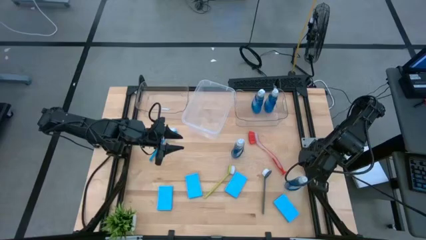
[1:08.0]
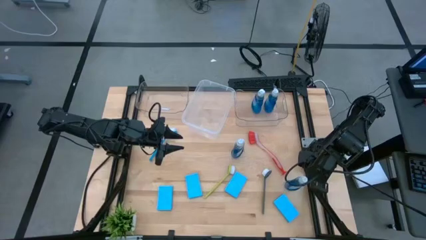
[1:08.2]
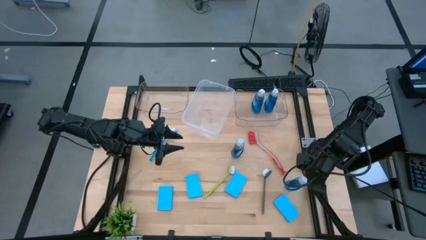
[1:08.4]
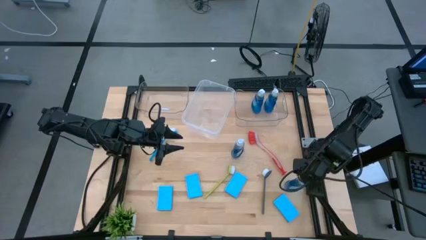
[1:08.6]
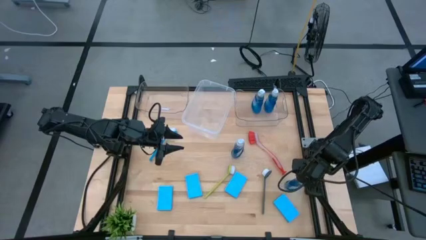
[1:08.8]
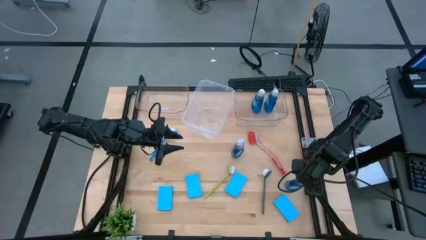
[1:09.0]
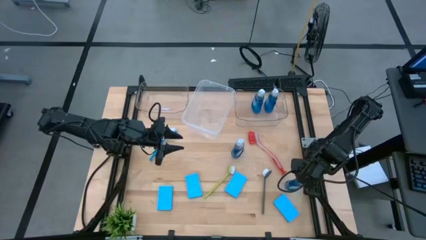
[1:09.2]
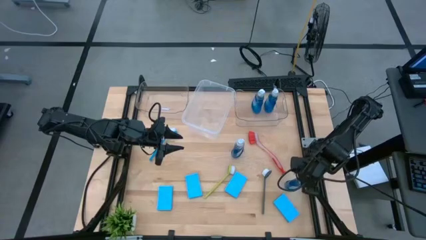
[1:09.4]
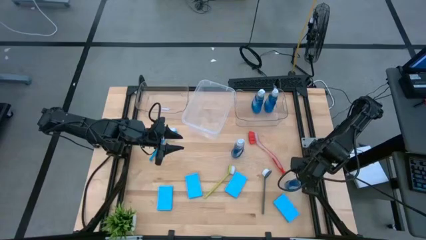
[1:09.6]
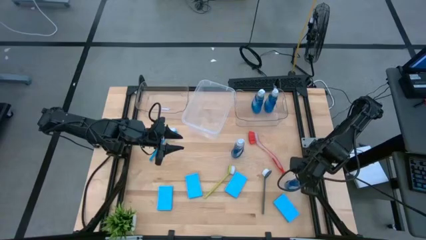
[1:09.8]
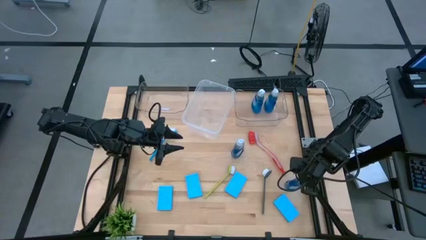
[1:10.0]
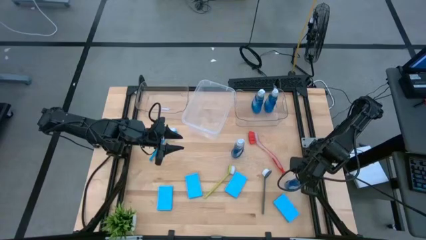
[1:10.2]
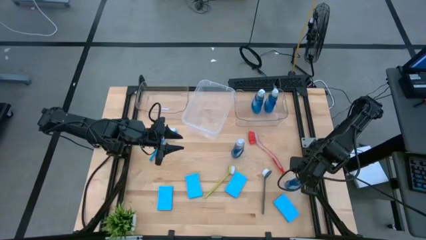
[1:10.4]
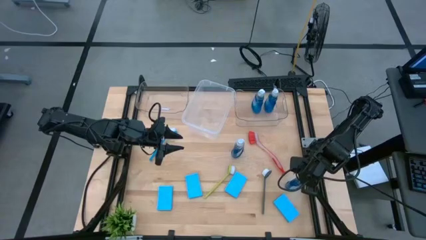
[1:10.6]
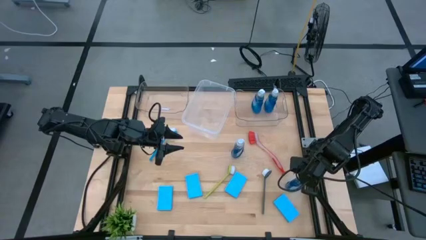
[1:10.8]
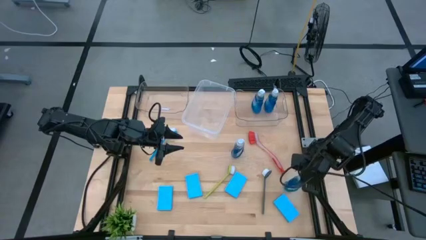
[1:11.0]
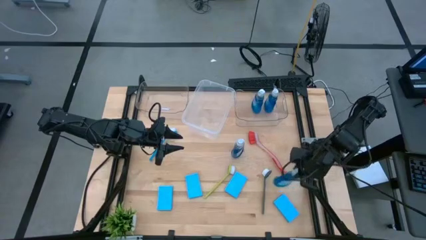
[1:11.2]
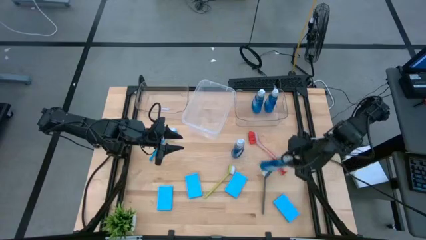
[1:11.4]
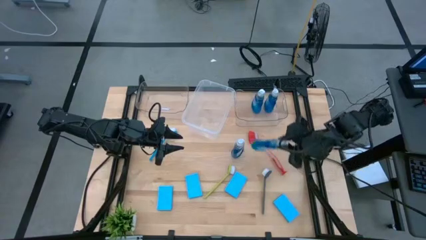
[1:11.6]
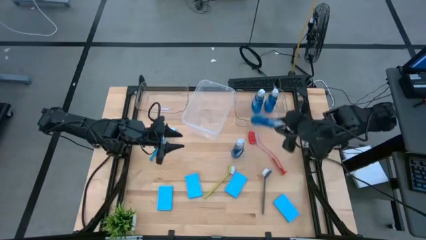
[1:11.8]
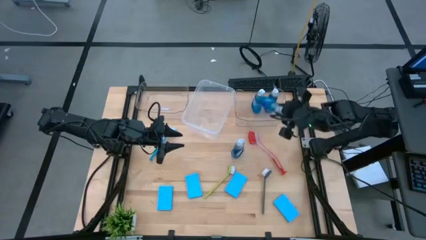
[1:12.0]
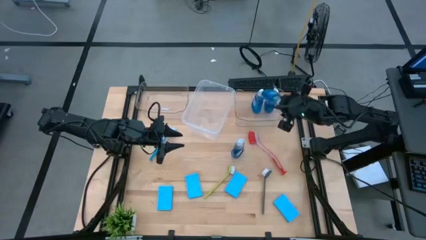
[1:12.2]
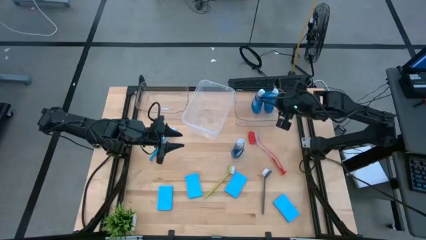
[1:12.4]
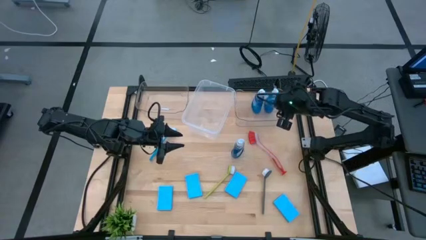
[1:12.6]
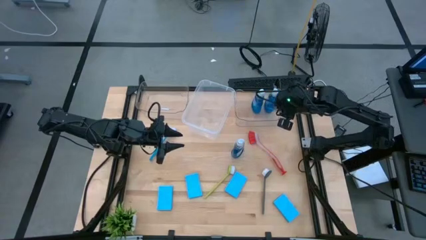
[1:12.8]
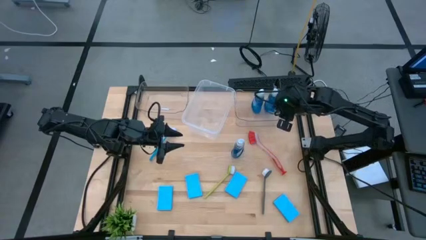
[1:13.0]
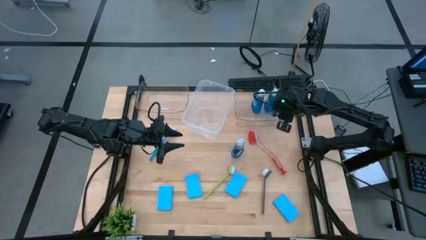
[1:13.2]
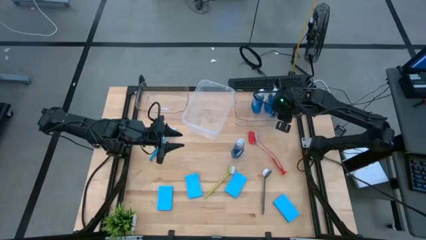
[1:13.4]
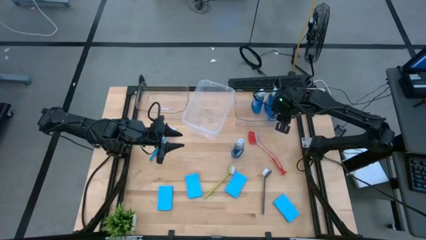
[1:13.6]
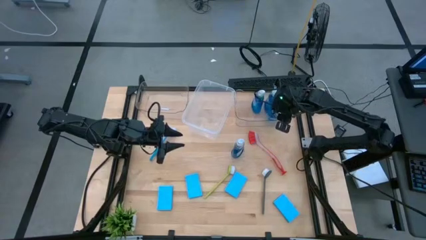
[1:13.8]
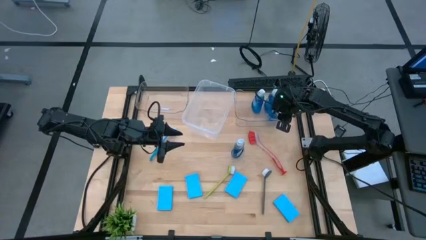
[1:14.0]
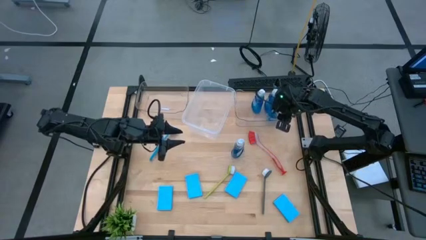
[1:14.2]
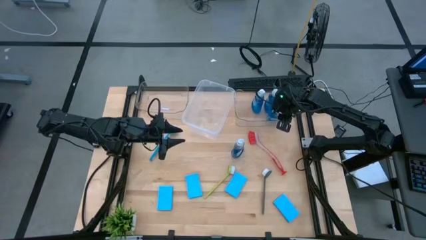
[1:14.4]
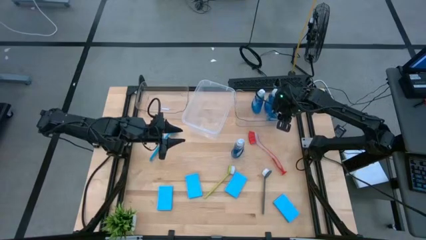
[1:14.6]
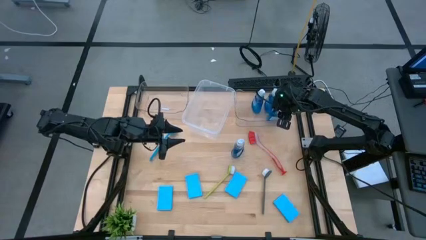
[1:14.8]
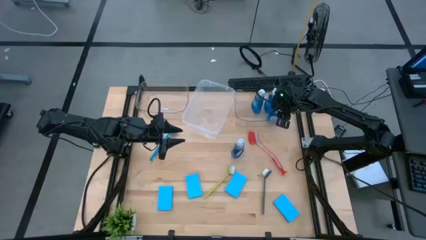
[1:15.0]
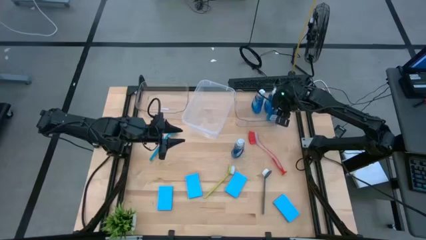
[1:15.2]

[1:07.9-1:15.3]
Task: Pick & Place Kitchen Sink Supplies
Put the blue soap dispenser into the right transparent bin

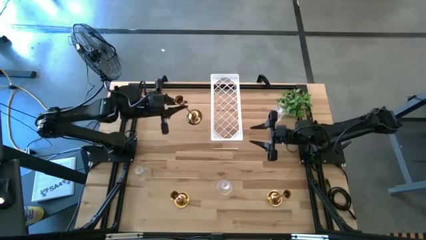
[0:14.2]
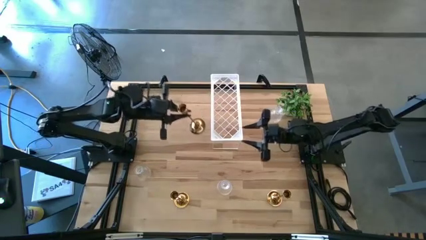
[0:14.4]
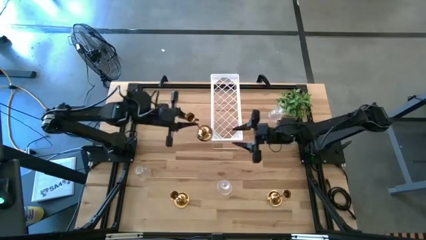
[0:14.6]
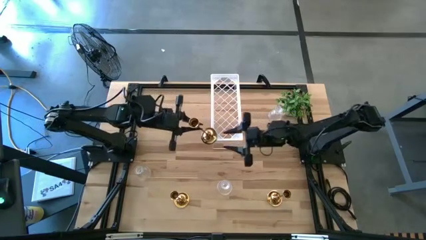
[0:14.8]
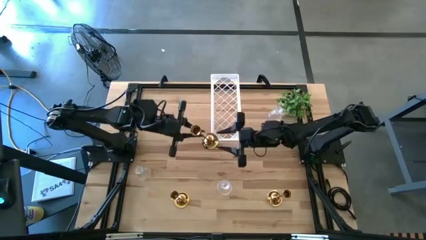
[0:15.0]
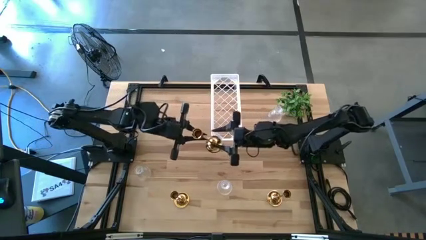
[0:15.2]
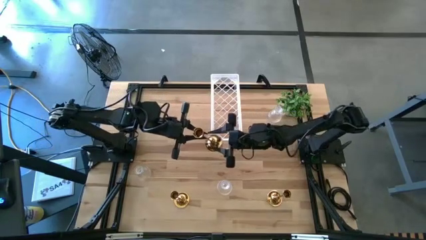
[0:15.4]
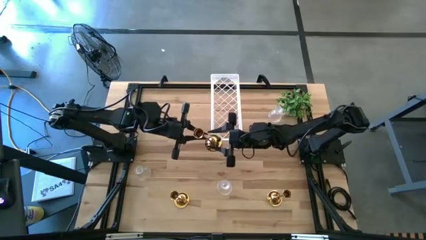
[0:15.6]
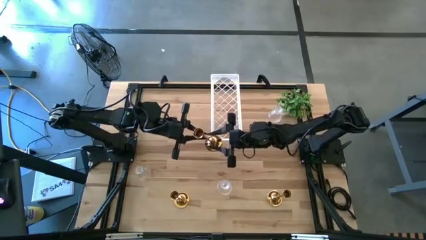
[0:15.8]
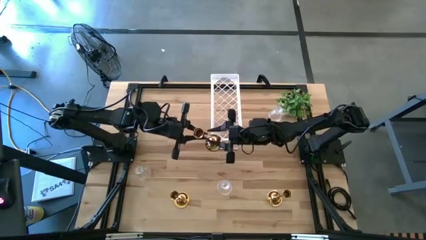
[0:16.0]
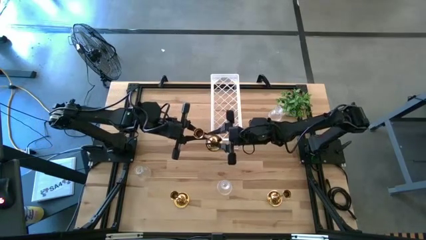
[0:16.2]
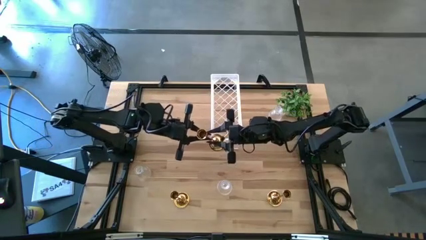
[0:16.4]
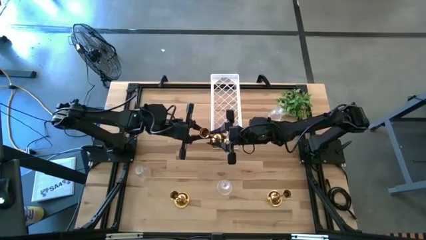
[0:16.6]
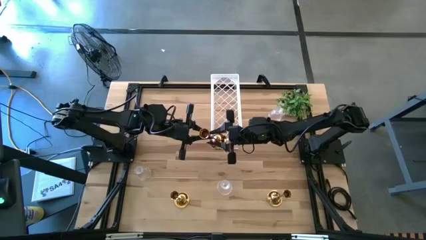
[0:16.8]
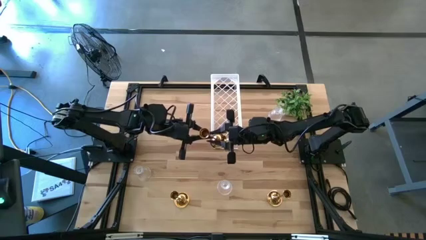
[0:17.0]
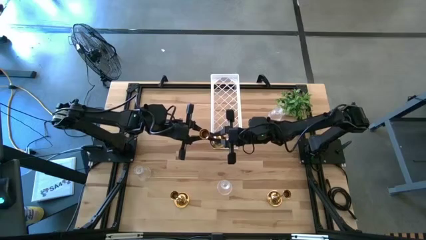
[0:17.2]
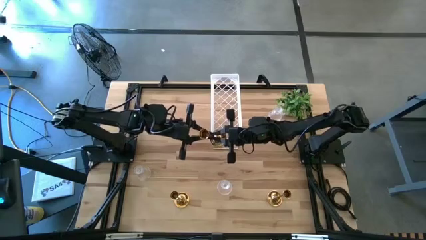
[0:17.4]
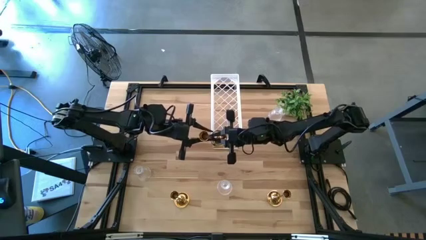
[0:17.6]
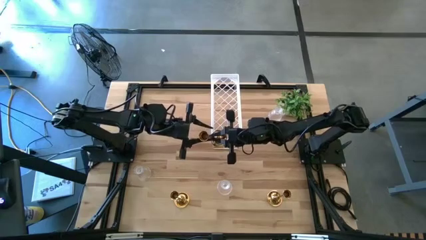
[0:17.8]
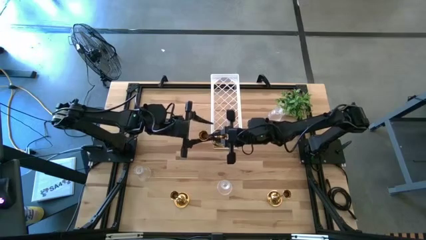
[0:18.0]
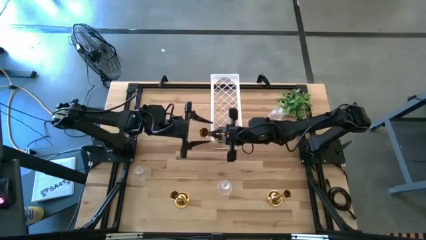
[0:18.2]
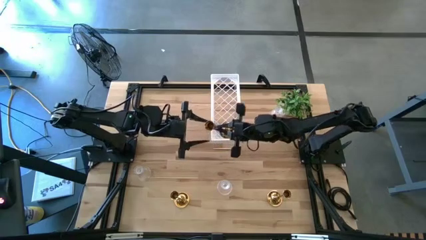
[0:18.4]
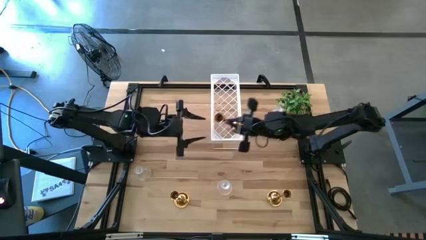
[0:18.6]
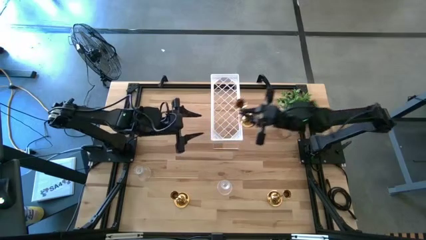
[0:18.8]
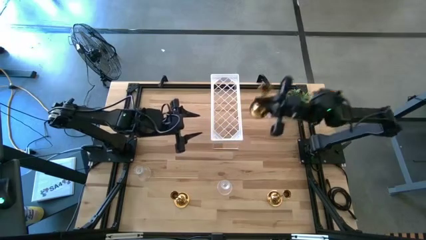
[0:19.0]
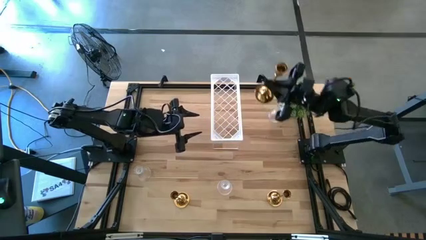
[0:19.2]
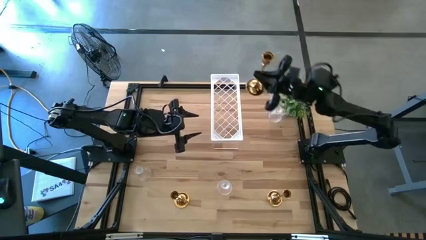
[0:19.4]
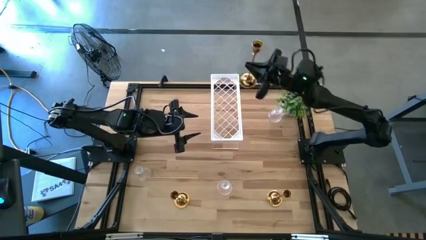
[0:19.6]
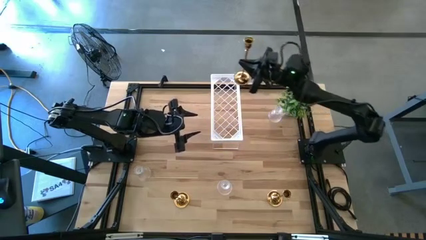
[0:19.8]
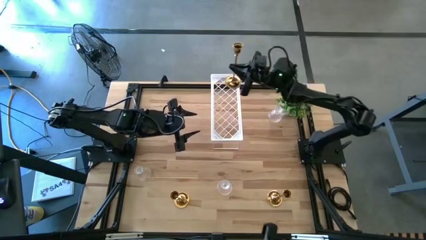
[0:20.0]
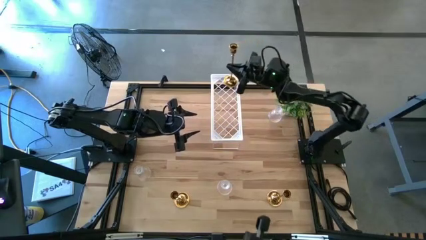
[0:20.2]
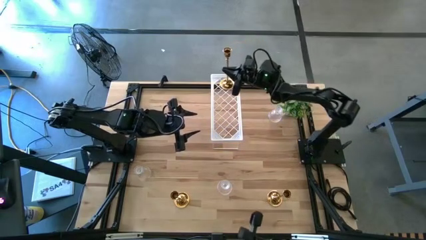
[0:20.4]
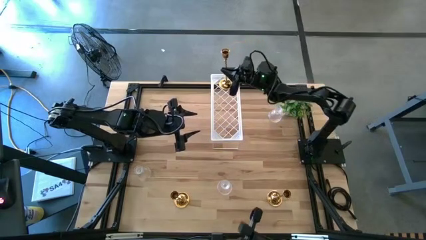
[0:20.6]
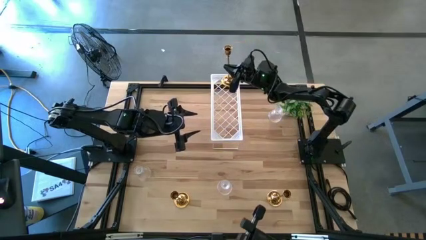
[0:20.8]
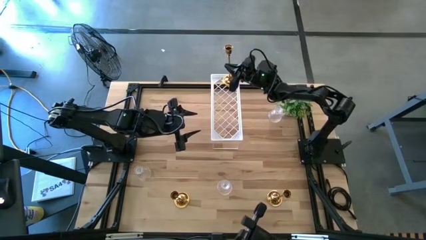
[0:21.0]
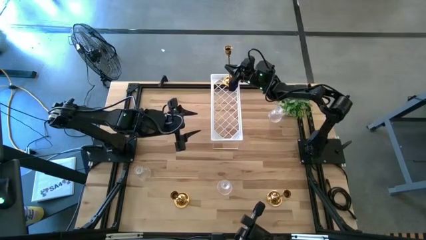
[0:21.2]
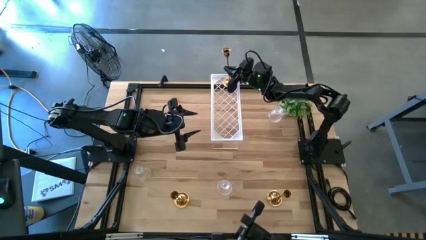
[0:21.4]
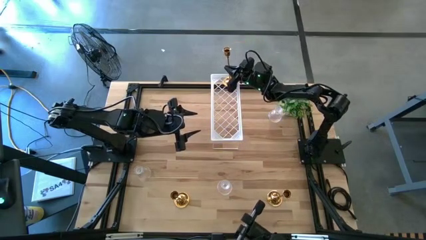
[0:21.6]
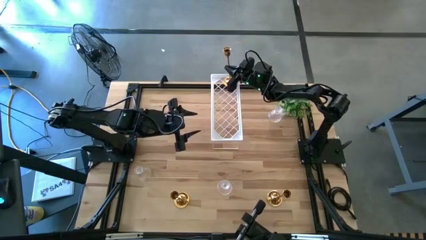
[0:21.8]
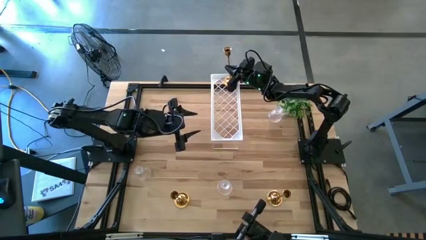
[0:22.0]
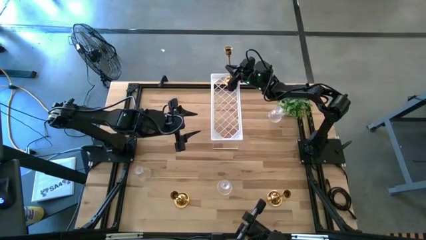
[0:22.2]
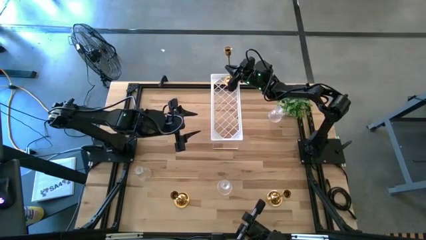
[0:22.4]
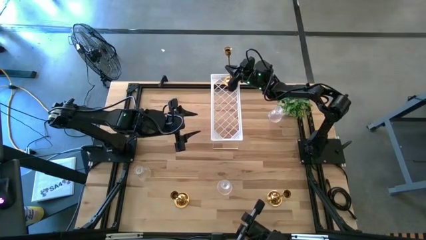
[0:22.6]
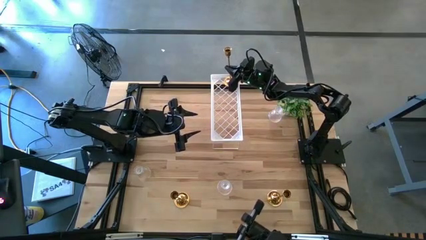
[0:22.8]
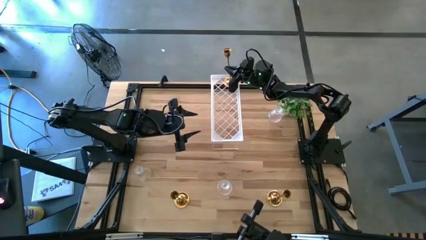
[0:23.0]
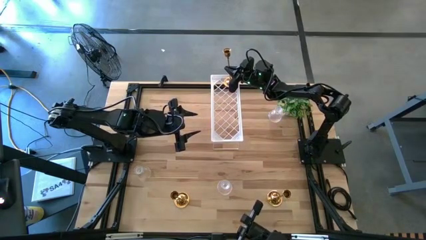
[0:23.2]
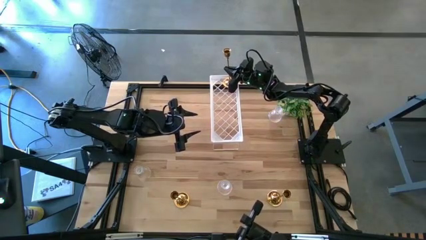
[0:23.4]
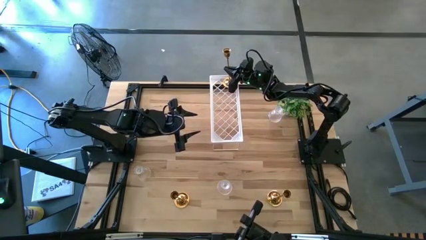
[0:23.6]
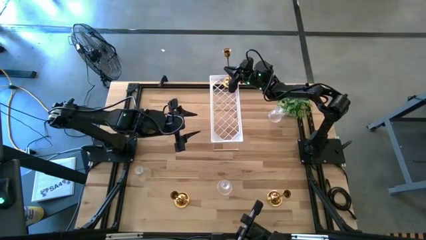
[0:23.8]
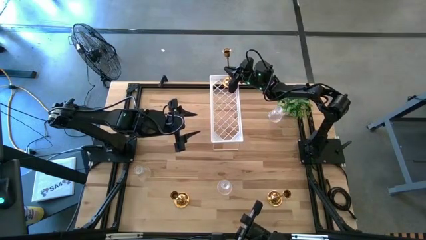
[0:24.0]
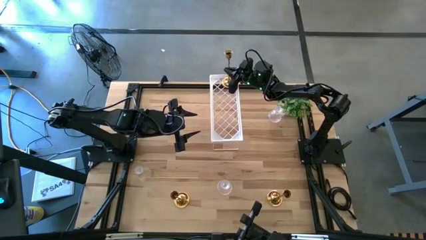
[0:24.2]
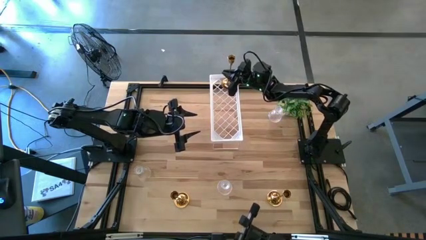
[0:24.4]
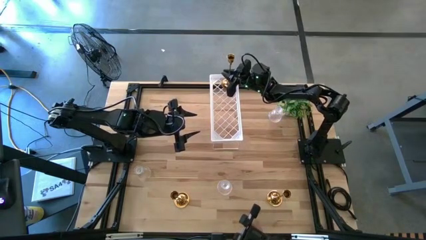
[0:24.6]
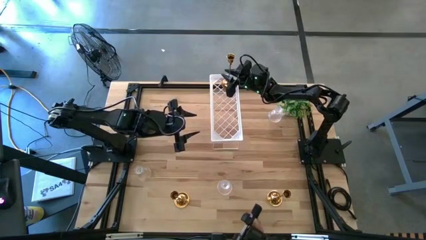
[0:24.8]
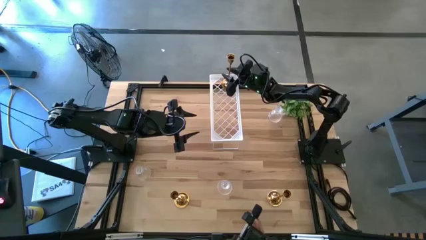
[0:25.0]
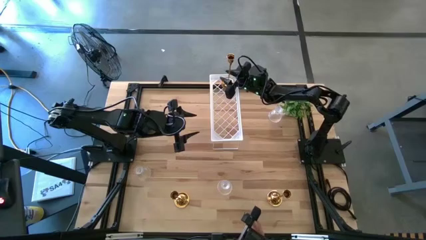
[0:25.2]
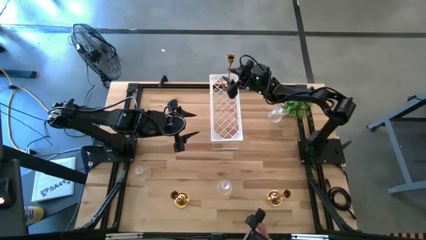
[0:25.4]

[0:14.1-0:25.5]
Task: Pick & Place candle stick holders
Put the top left gold candle holder on the shelf
